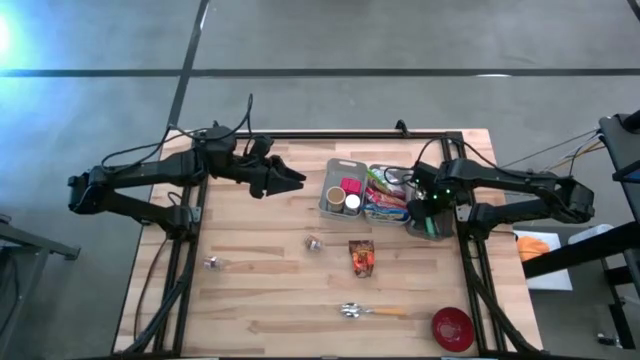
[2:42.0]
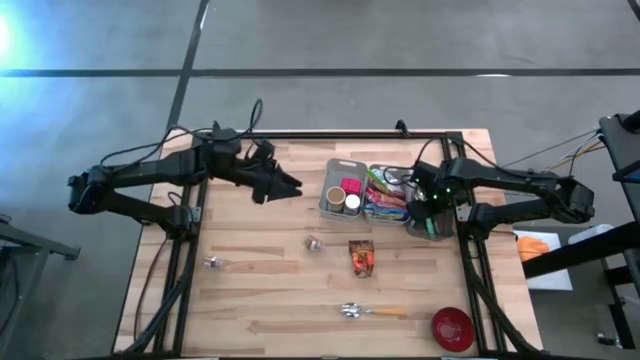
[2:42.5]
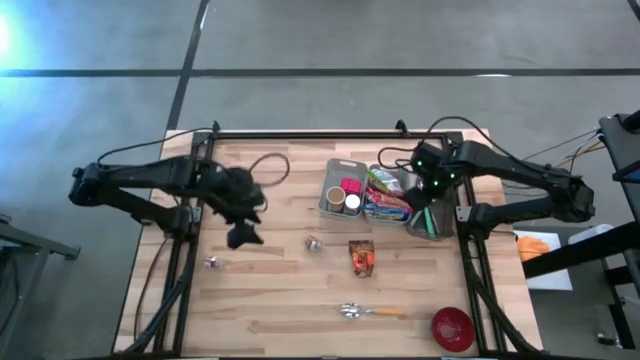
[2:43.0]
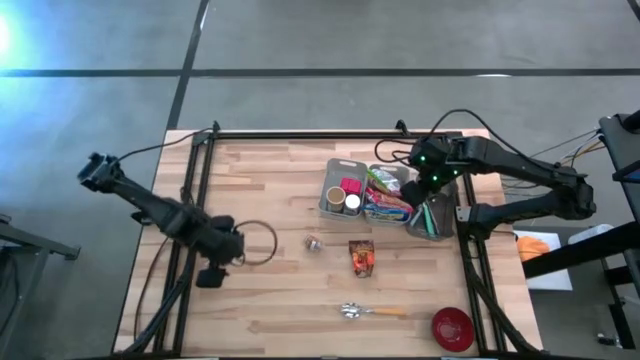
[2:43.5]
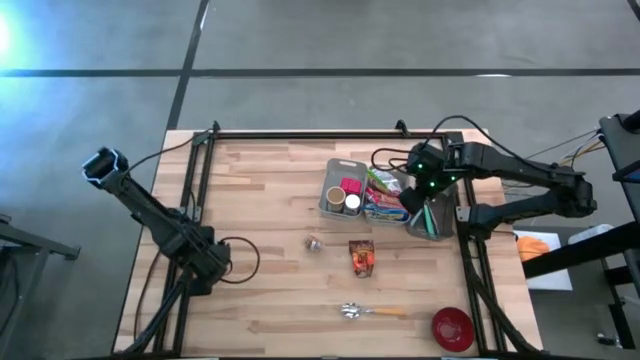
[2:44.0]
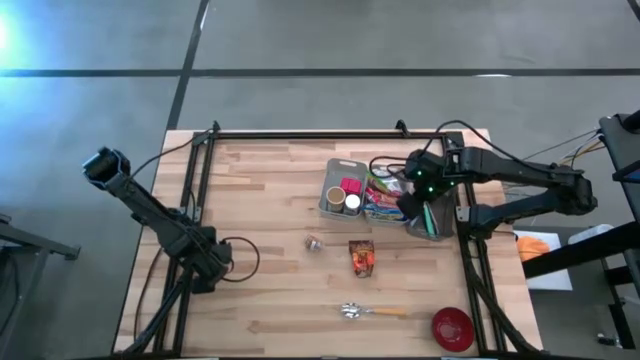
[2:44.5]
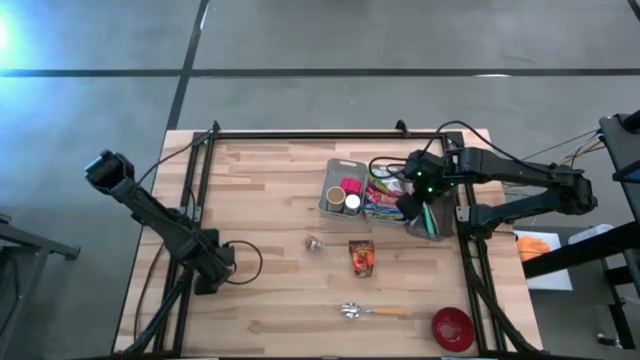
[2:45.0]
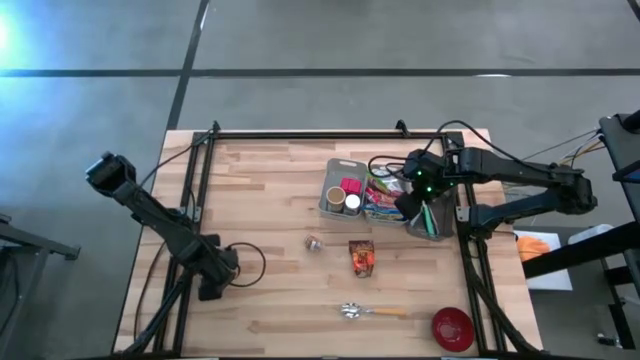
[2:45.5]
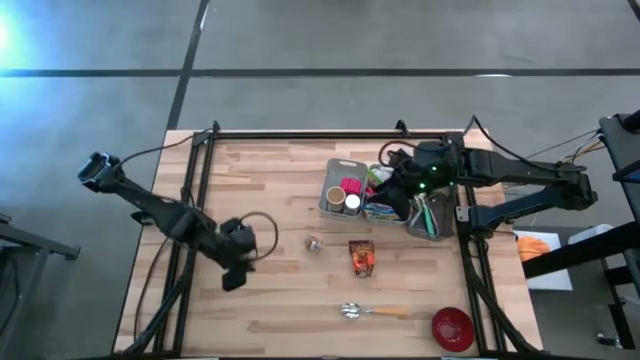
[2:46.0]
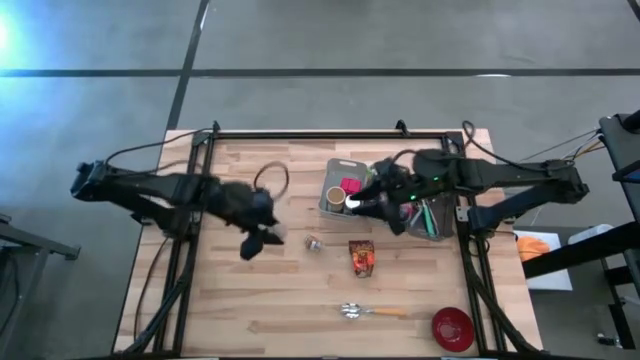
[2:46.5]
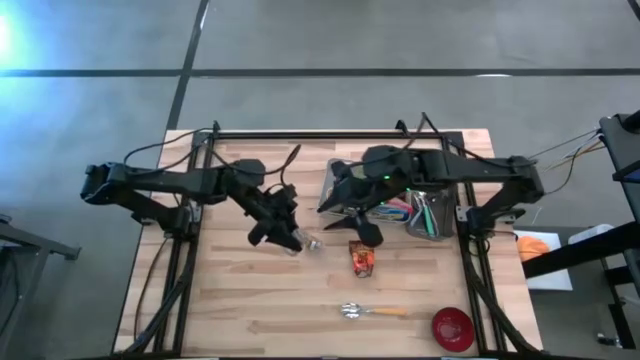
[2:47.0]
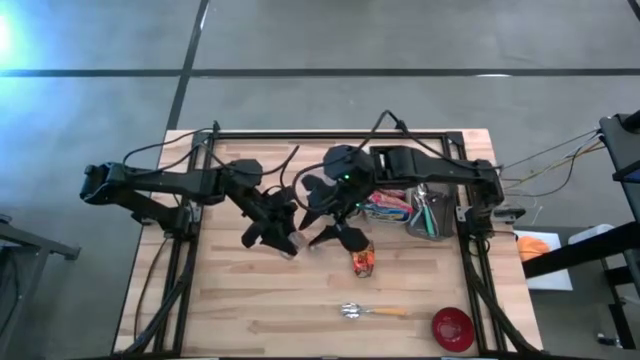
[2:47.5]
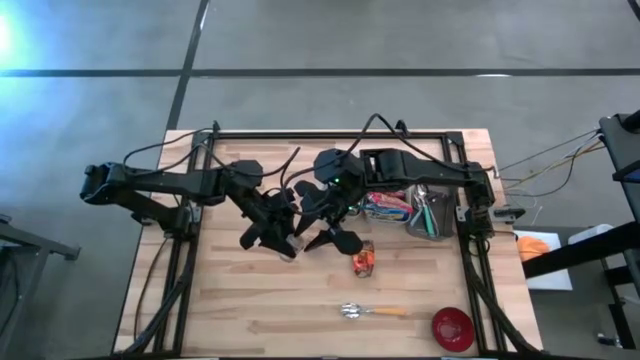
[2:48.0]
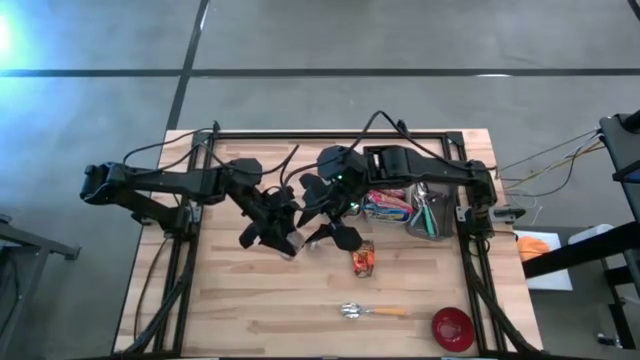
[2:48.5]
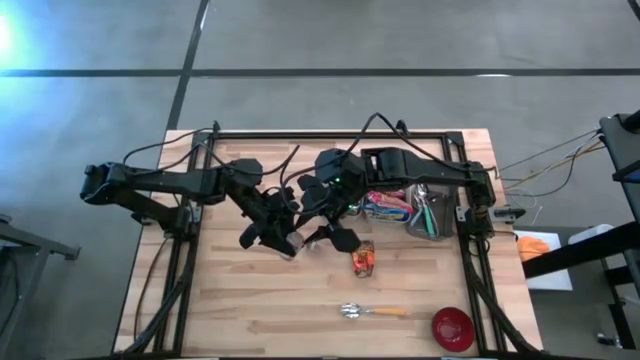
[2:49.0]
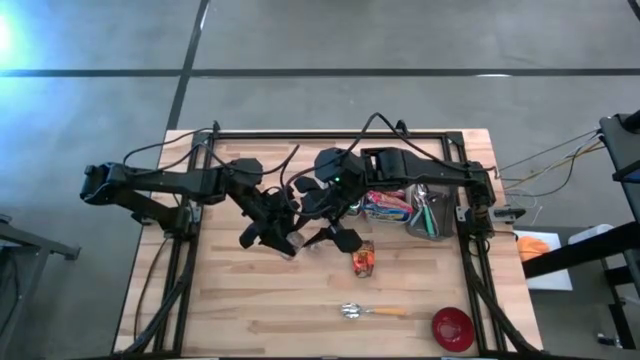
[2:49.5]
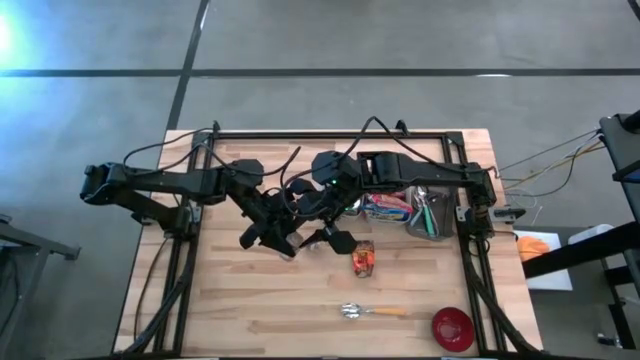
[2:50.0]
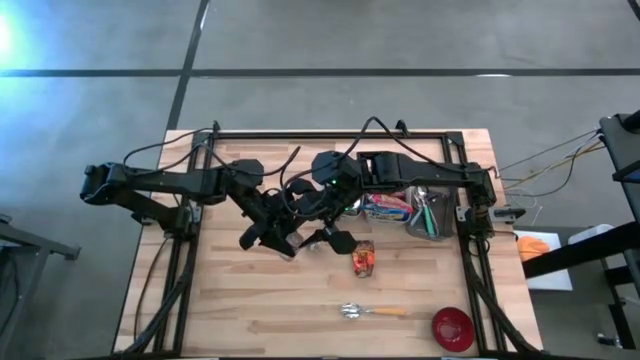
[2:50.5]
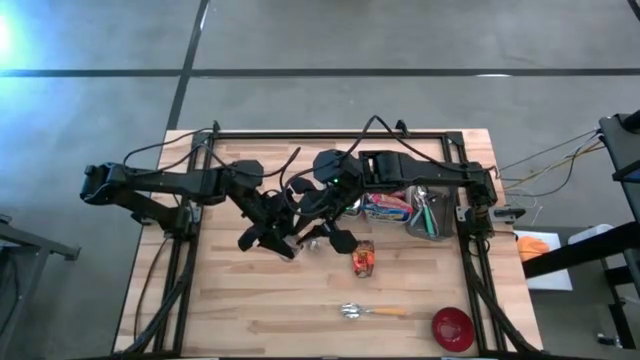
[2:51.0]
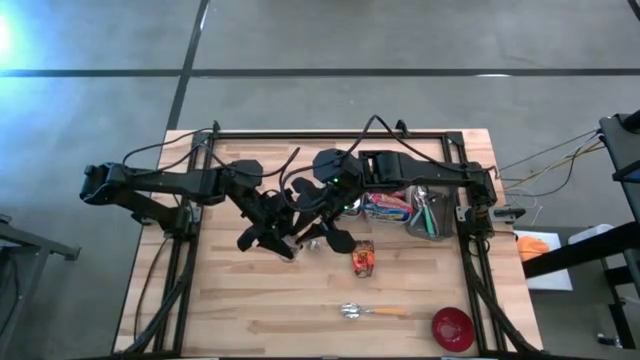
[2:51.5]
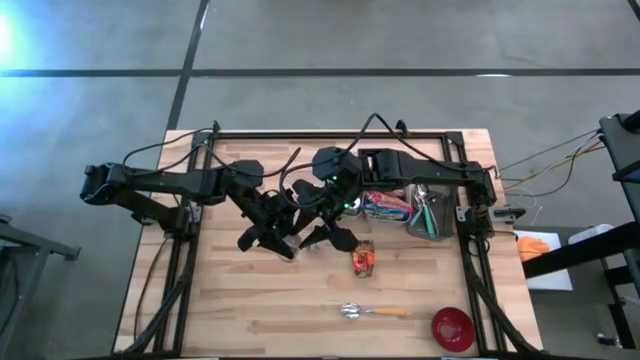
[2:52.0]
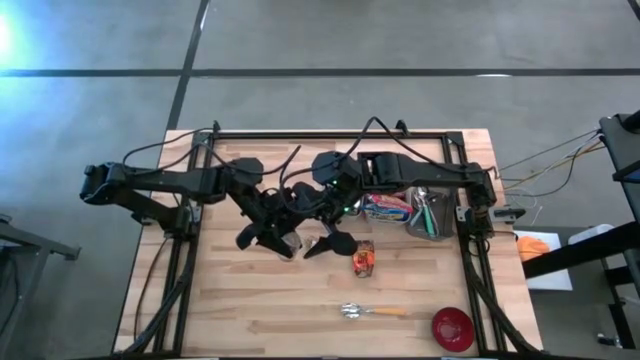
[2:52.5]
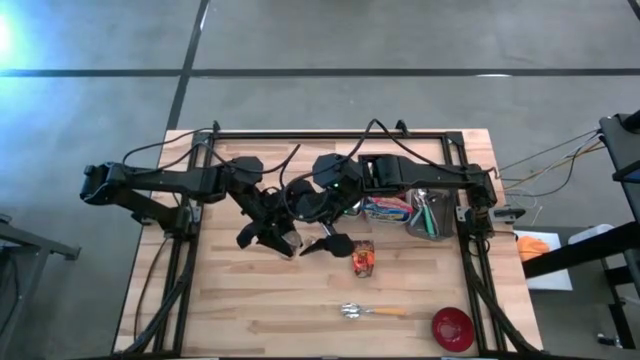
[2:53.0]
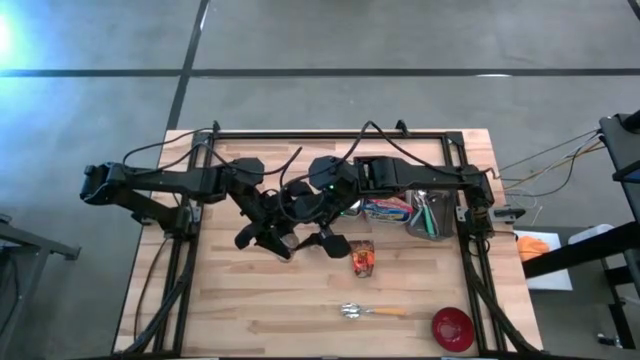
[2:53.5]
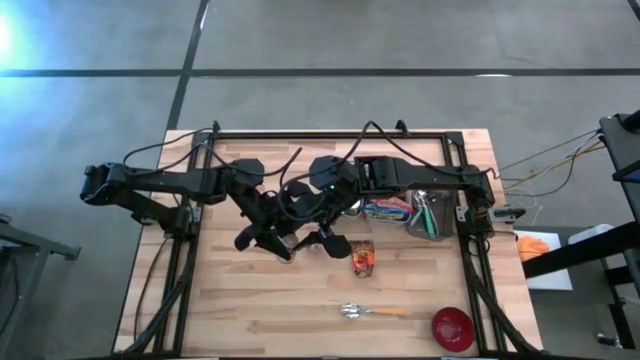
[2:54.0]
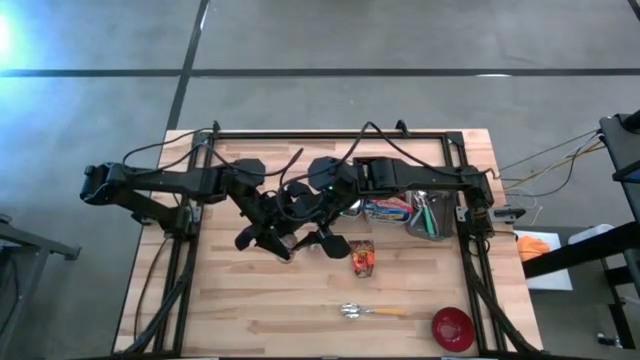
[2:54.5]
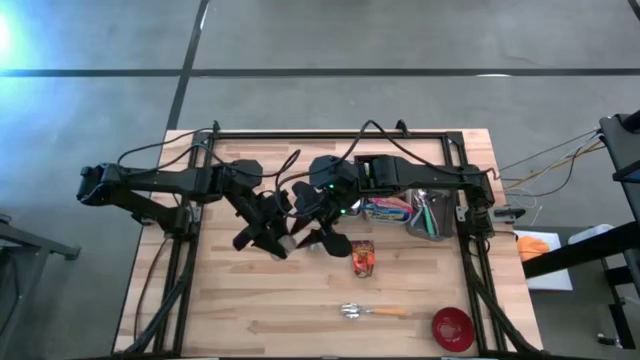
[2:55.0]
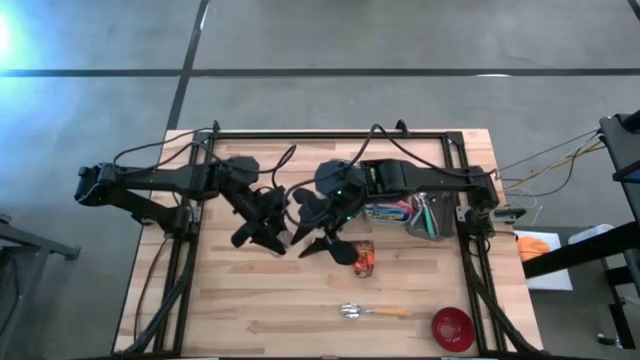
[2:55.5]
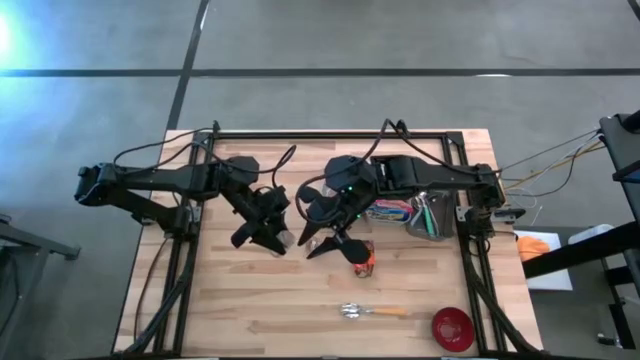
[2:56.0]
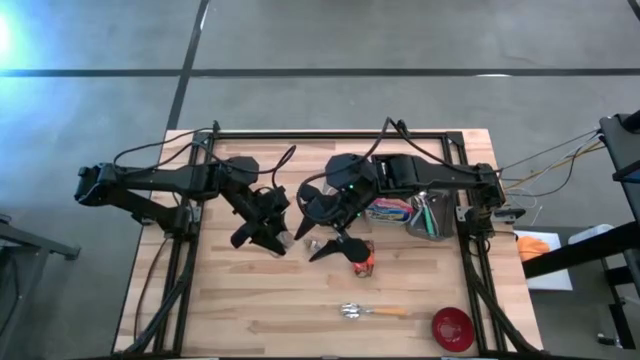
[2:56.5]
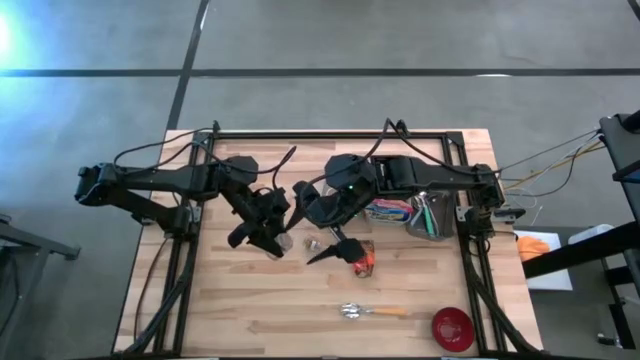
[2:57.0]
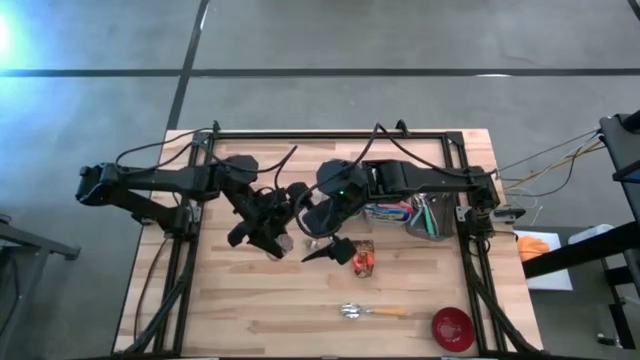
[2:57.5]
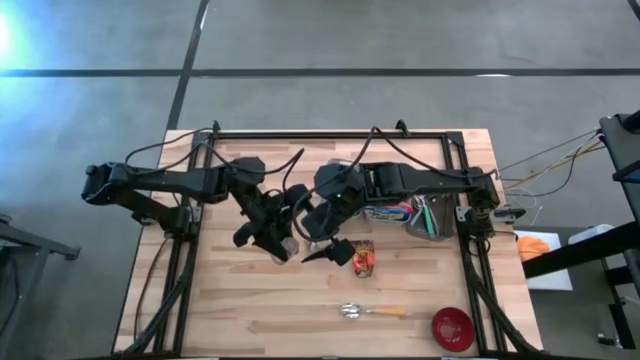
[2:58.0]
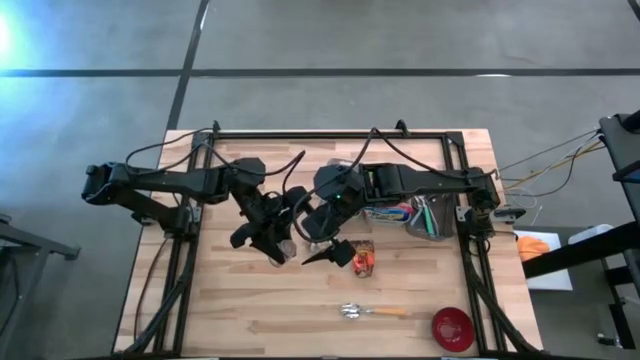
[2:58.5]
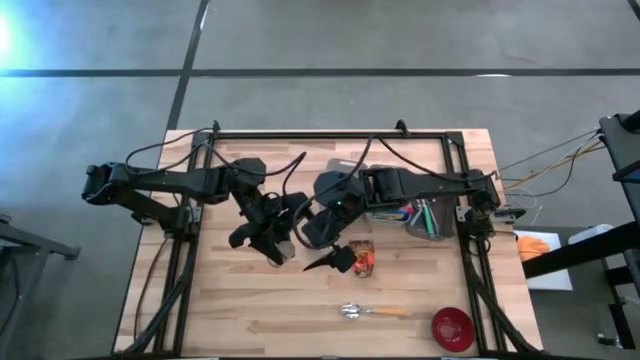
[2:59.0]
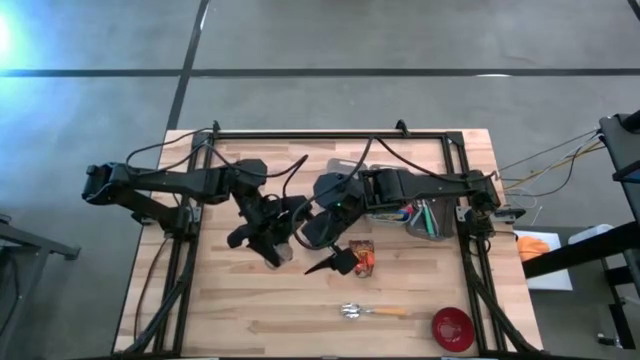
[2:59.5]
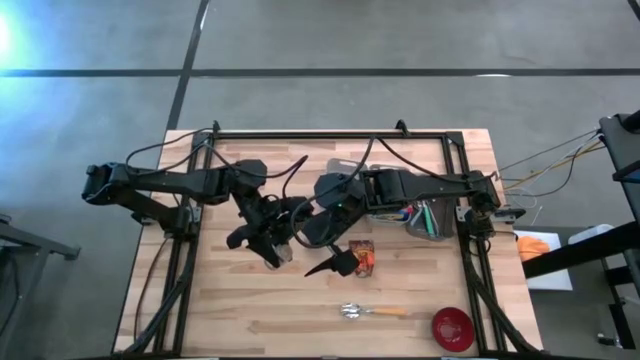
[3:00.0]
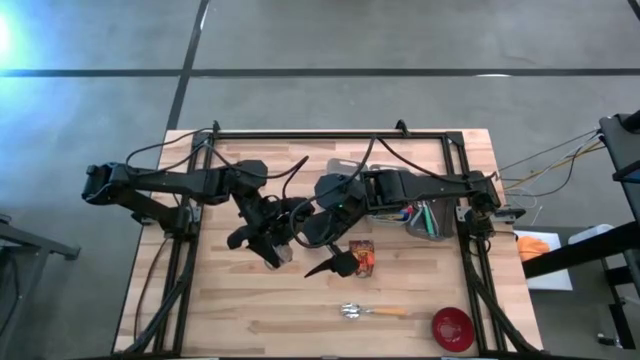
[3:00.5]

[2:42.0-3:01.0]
Put the bottom brown seasoning bottle into the left gray bin
